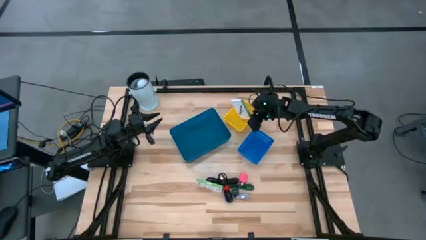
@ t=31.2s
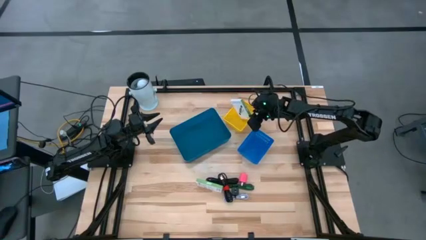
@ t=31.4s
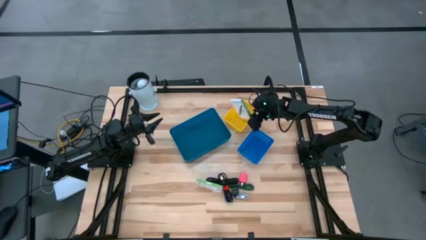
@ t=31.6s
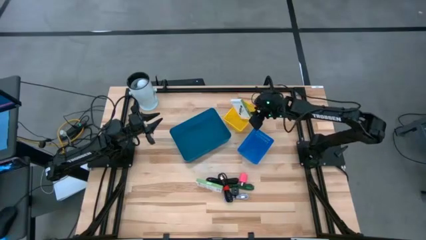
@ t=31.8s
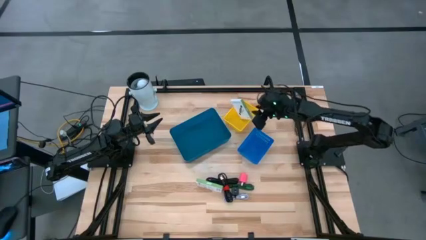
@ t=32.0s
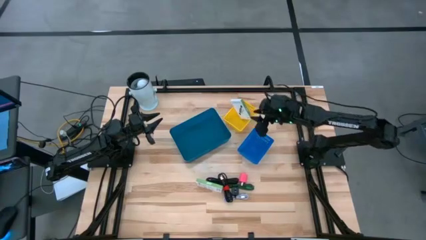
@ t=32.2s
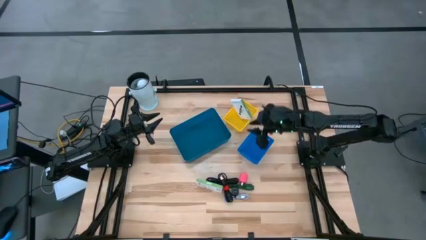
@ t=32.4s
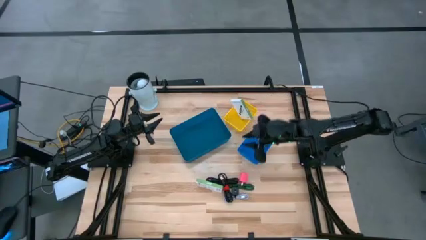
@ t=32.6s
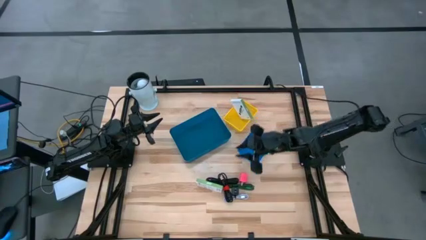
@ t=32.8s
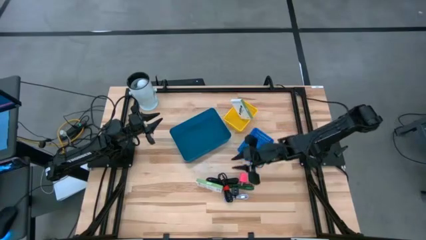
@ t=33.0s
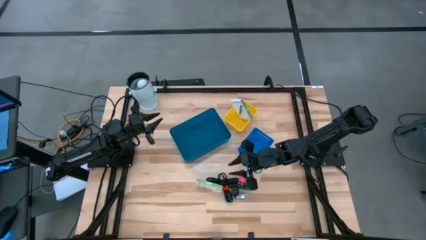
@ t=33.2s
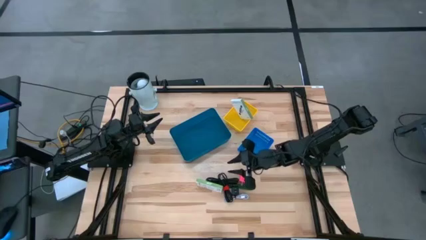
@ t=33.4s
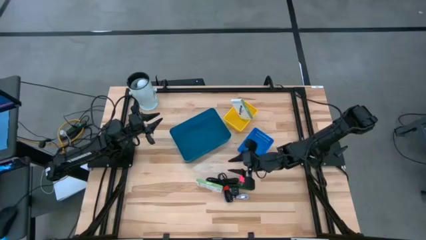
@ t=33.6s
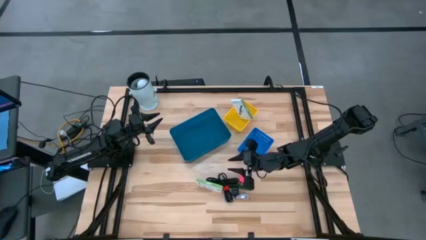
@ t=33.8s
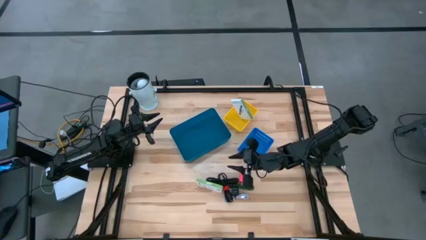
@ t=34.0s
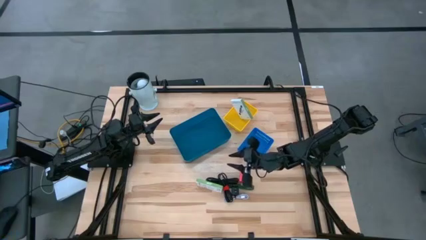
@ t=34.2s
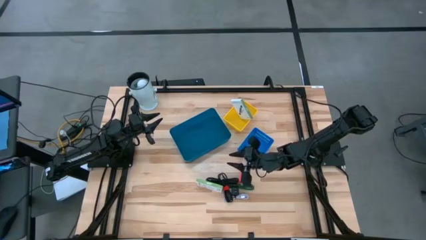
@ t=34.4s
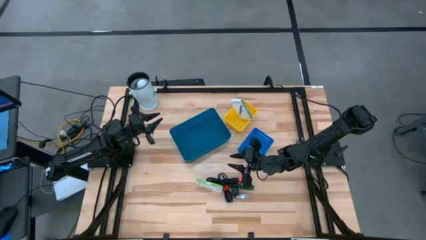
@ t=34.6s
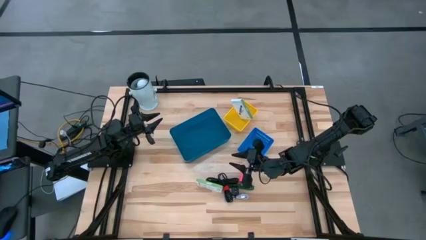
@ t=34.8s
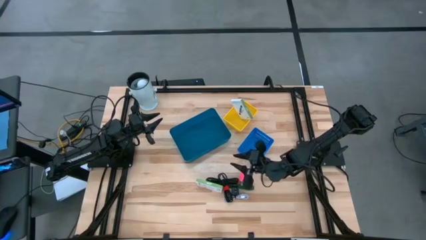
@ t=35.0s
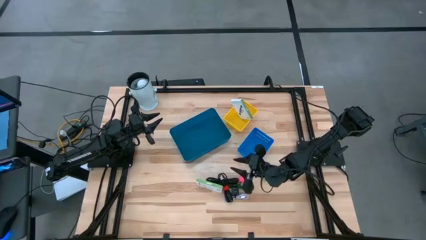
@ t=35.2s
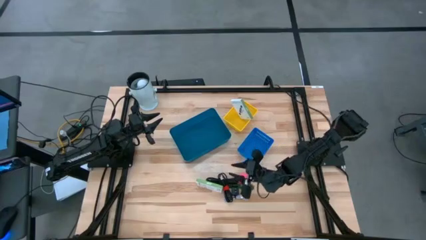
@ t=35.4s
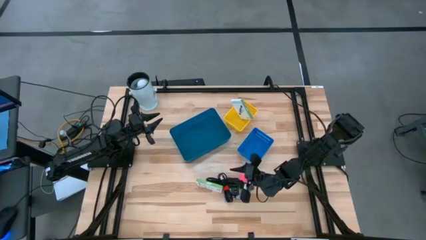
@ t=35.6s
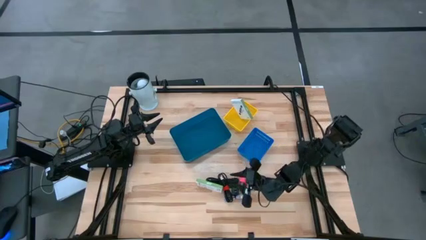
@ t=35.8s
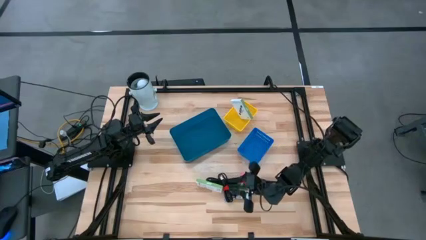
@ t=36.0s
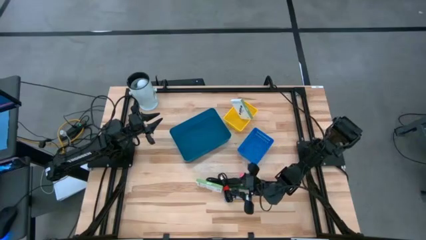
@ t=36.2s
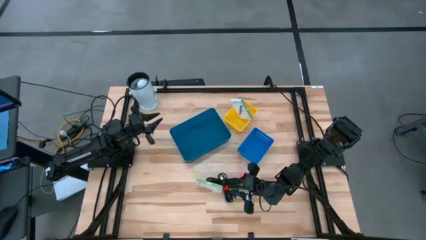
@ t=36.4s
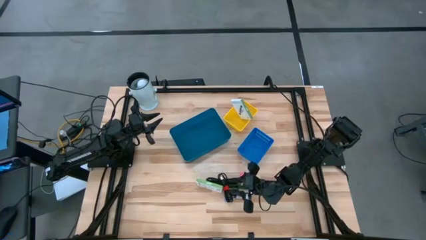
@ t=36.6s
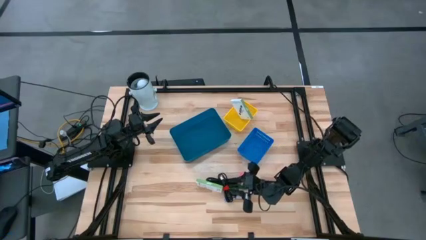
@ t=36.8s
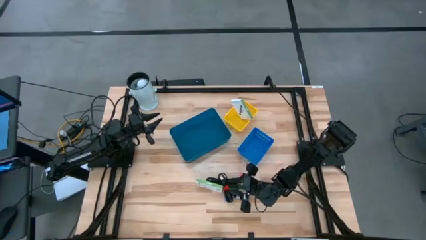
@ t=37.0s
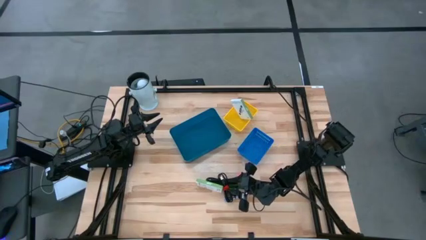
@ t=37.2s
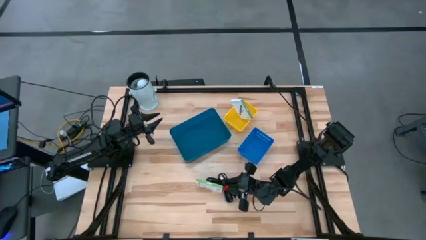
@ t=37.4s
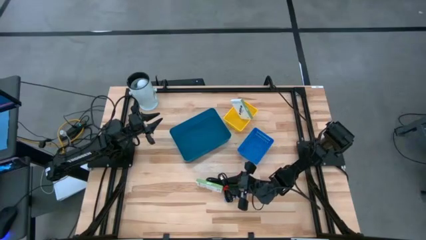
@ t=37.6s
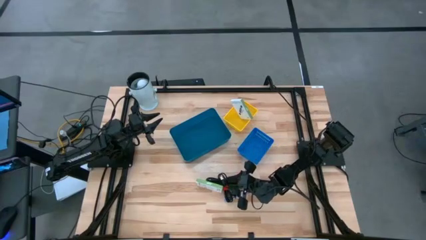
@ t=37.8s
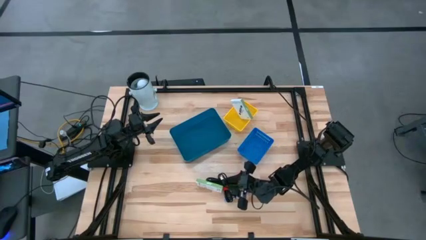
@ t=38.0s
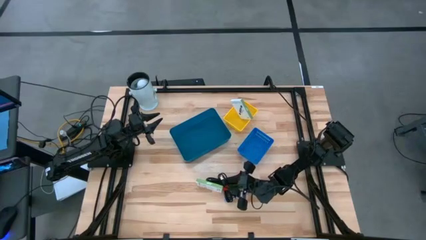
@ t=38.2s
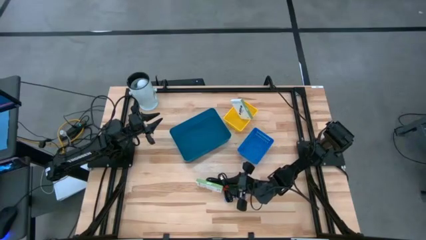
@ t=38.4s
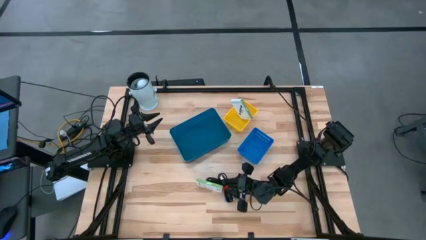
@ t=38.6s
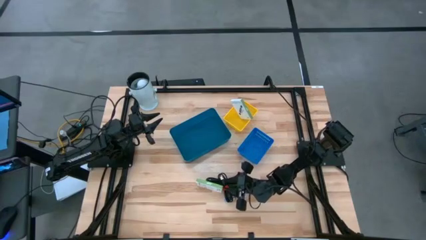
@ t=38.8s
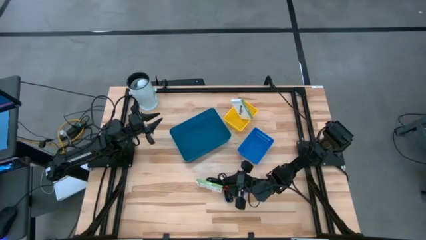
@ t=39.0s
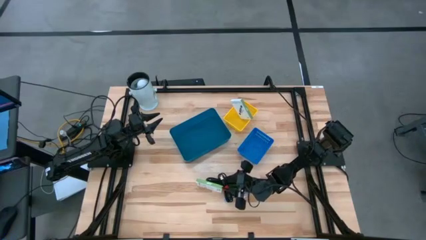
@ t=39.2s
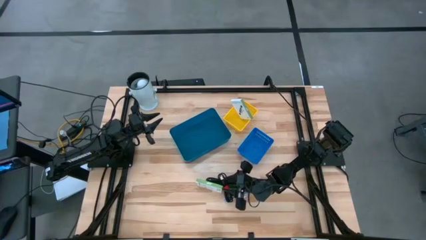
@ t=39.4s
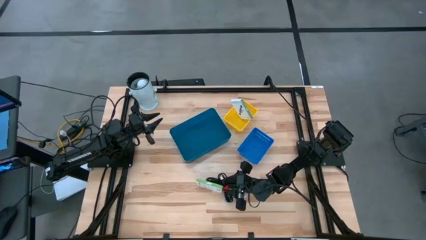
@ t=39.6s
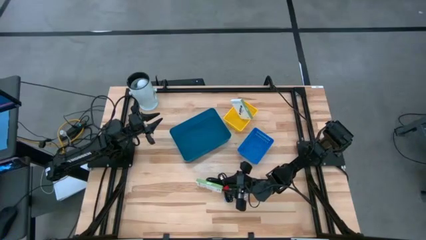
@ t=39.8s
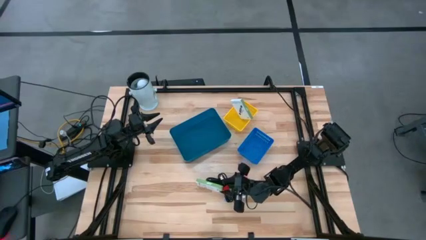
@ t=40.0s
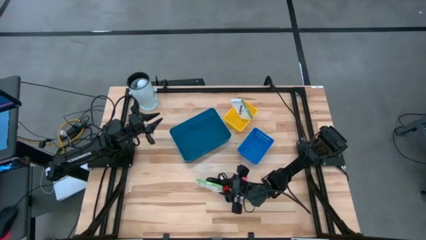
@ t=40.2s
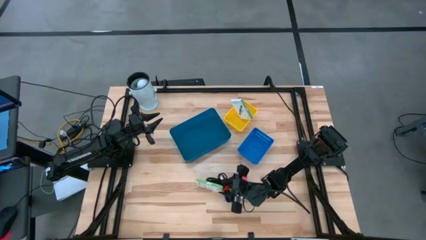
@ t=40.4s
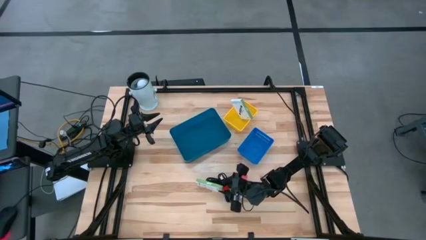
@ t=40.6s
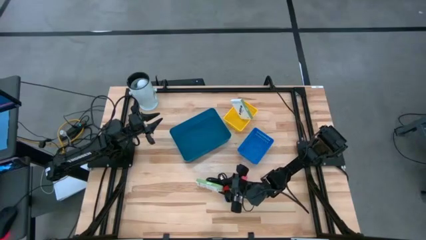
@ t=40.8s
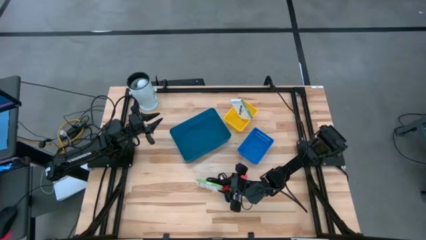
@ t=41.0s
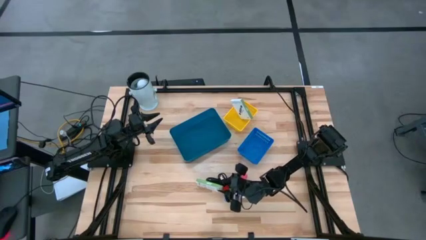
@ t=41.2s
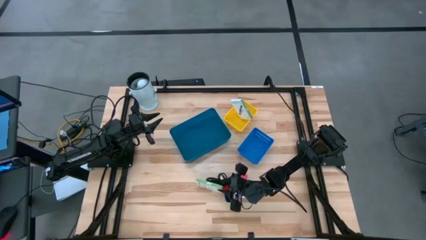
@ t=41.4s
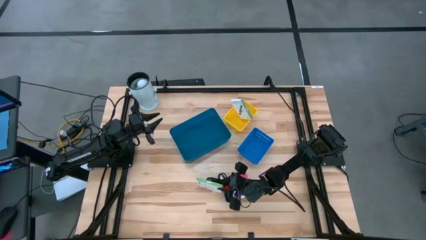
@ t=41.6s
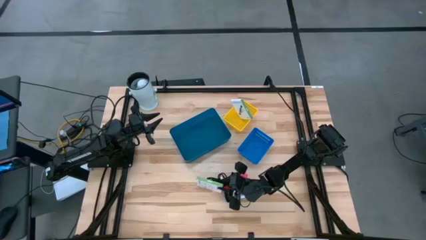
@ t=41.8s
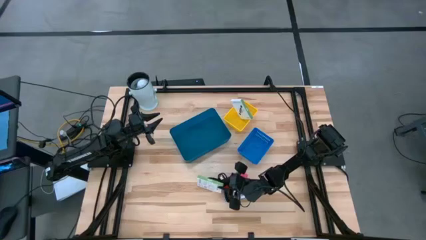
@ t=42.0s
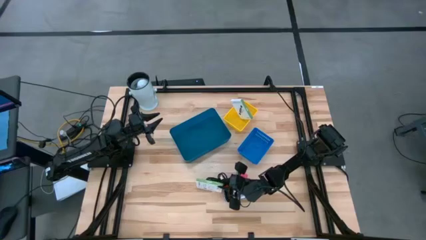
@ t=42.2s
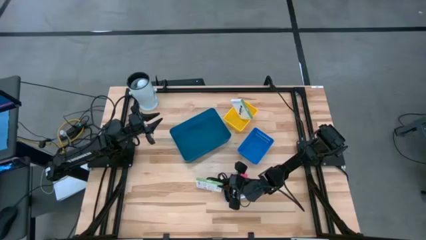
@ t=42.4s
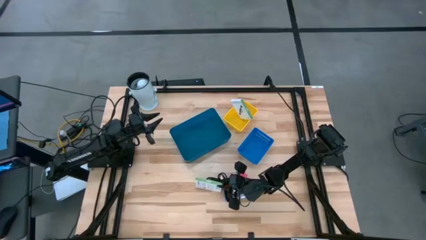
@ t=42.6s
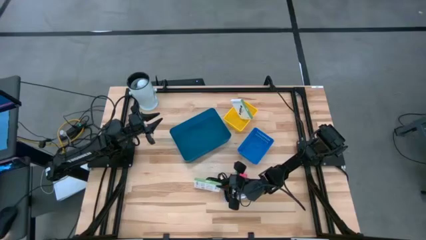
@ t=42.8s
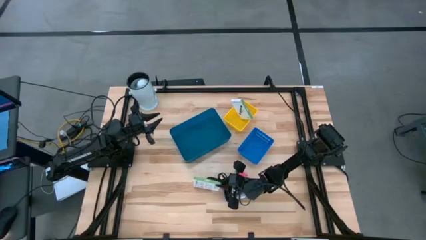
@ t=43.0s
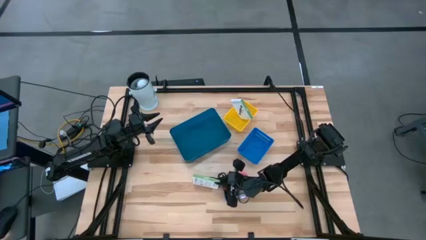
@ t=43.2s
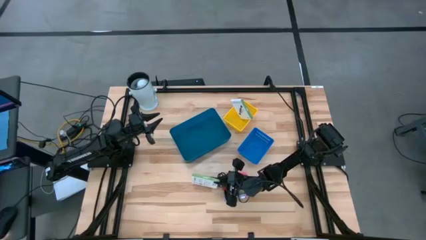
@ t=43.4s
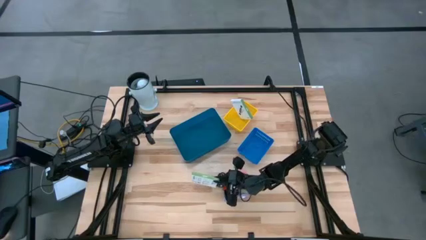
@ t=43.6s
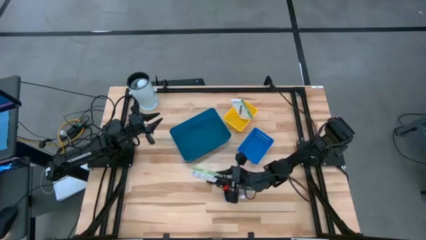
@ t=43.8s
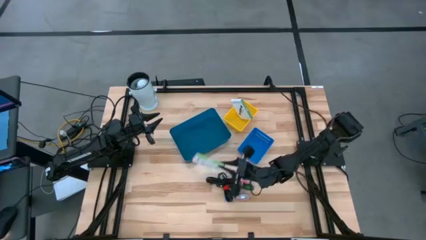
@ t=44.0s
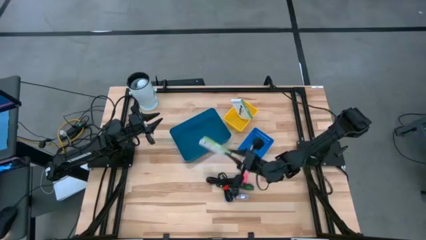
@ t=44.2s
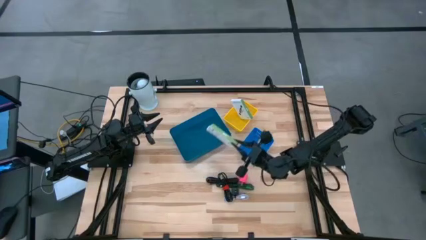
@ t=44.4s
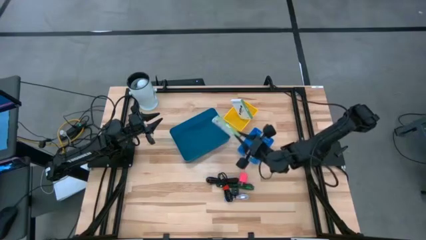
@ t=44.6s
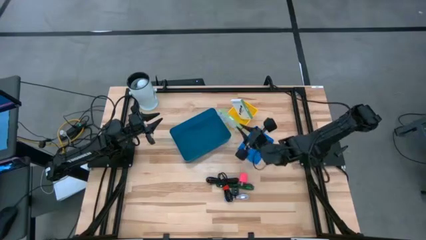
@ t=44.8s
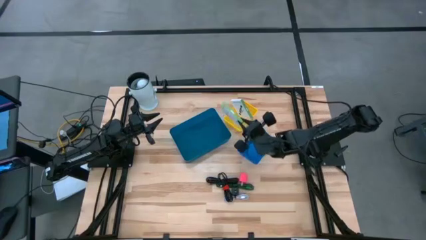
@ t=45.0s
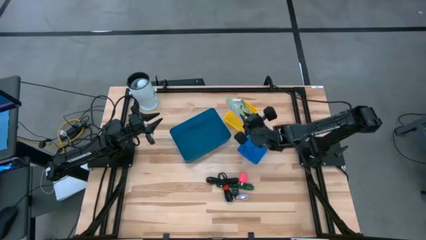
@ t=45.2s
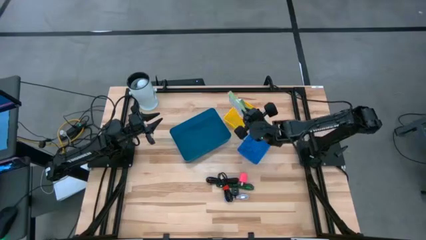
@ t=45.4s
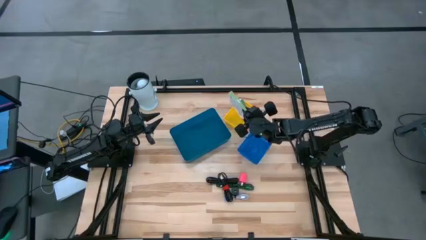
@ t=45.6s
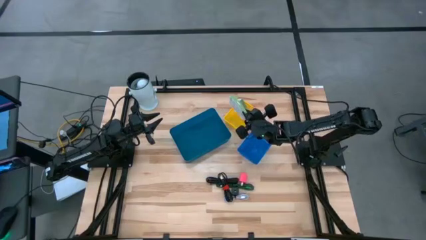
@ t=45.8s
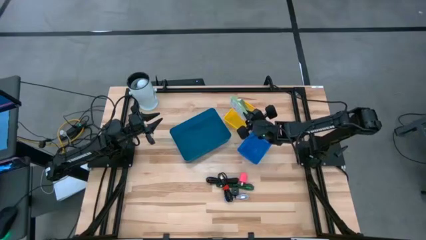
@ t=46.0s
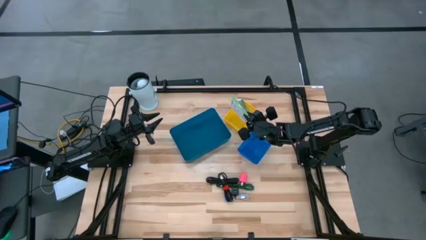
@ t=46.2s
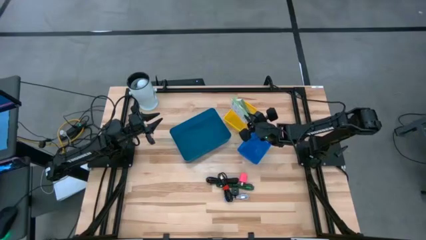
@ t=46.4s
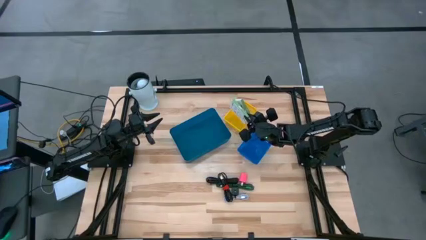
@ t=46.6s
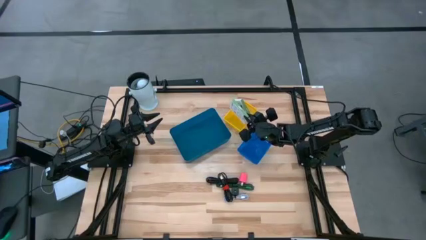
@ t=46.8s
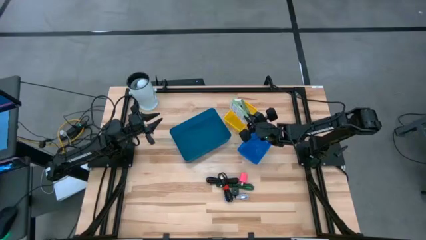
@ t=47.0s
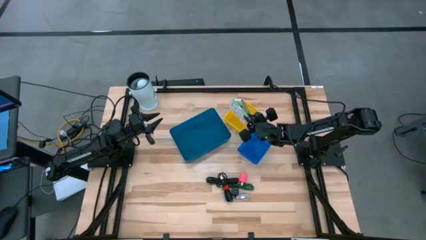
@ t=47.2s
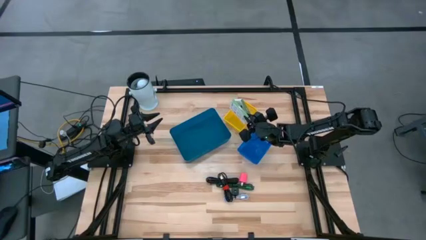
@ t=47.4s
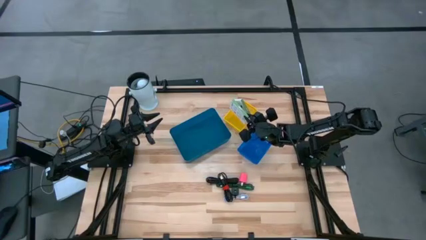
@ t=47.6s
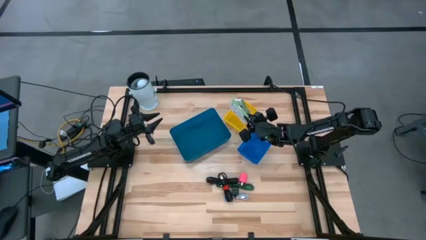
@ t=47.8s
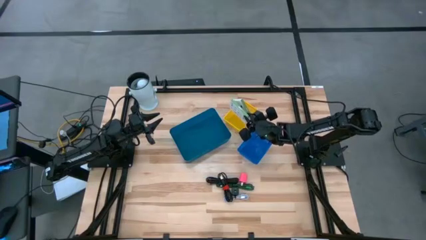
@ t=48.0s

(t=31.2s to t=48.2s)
Task: Pick and place items into bin
Put the card reader box into the yellow bin
